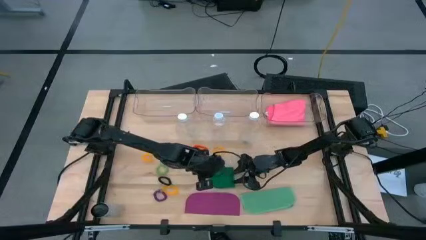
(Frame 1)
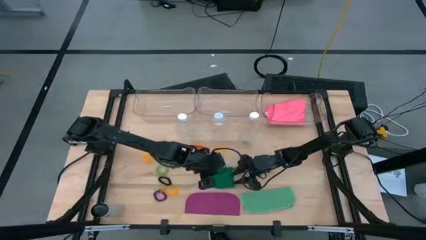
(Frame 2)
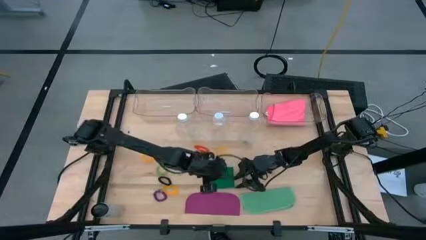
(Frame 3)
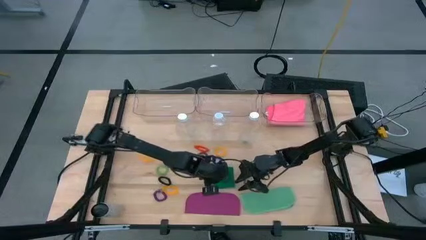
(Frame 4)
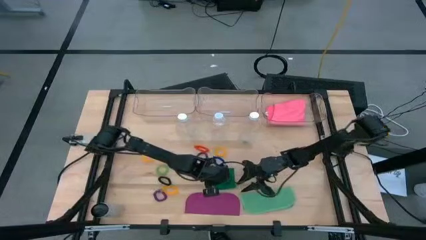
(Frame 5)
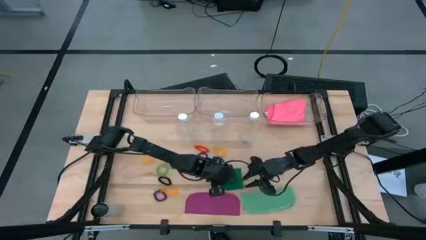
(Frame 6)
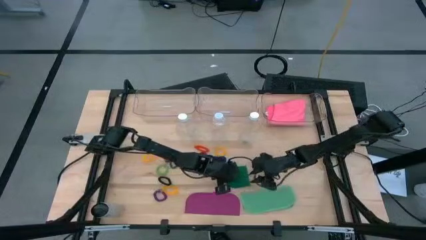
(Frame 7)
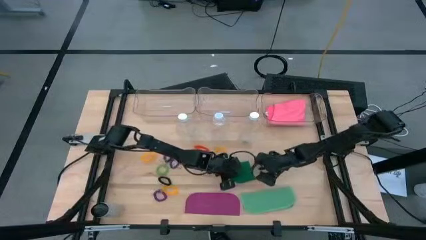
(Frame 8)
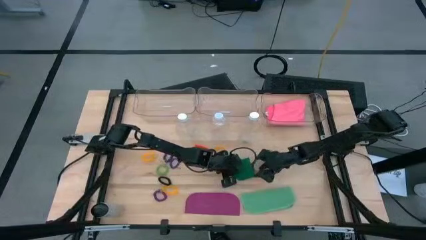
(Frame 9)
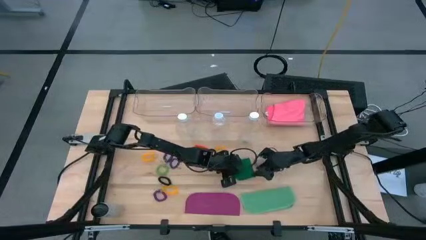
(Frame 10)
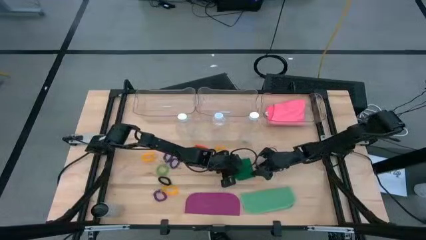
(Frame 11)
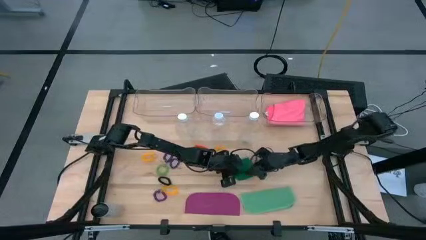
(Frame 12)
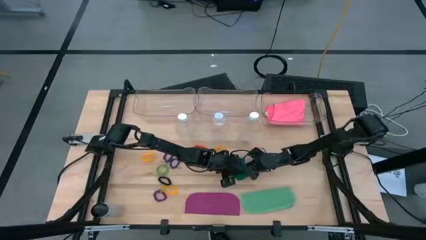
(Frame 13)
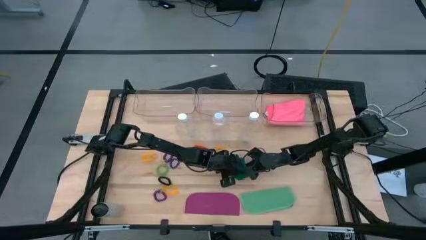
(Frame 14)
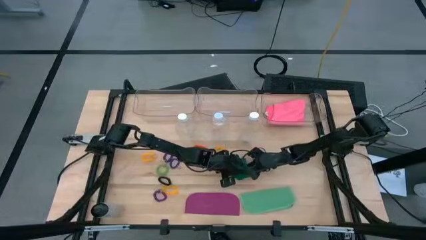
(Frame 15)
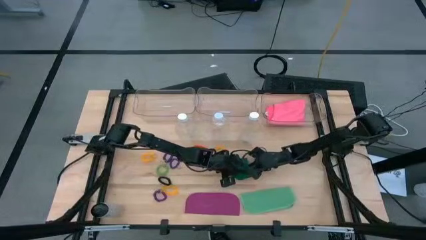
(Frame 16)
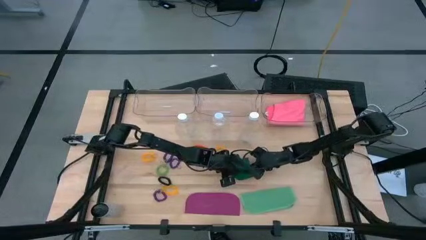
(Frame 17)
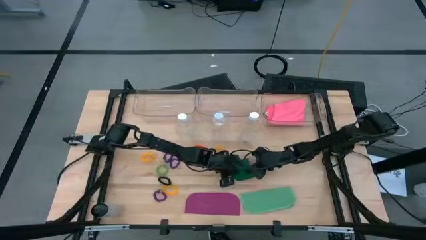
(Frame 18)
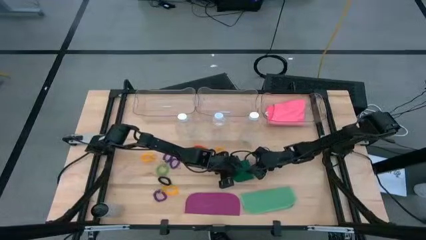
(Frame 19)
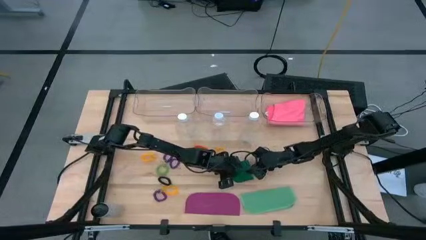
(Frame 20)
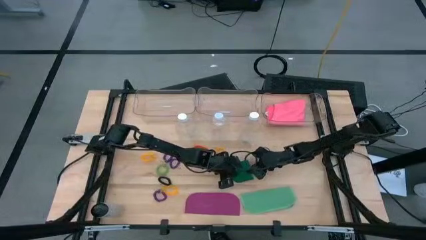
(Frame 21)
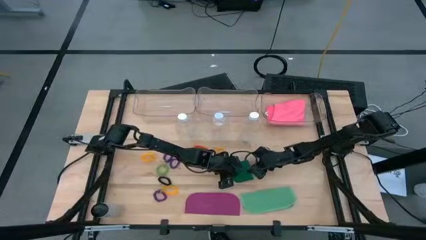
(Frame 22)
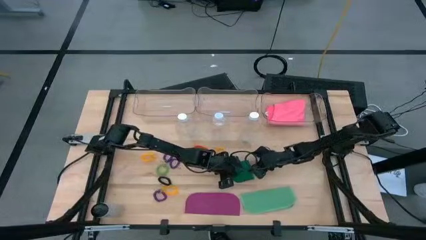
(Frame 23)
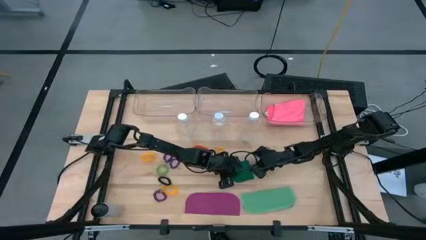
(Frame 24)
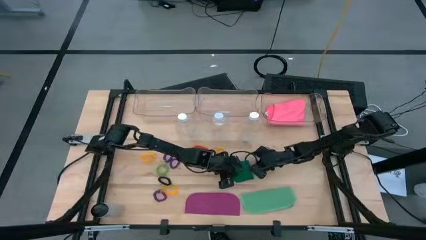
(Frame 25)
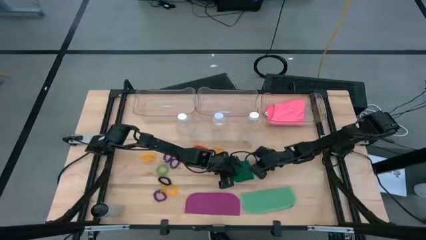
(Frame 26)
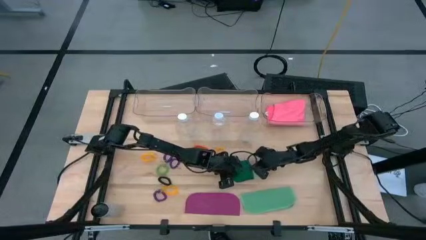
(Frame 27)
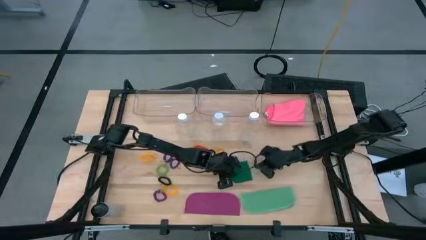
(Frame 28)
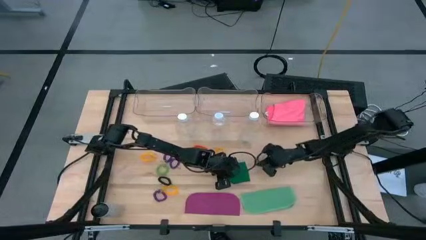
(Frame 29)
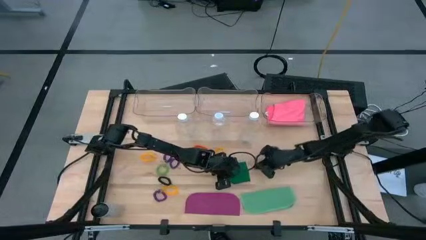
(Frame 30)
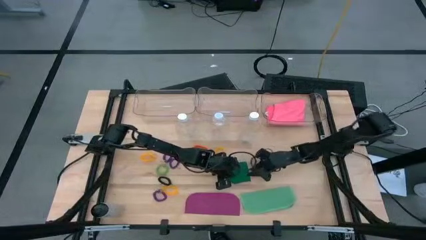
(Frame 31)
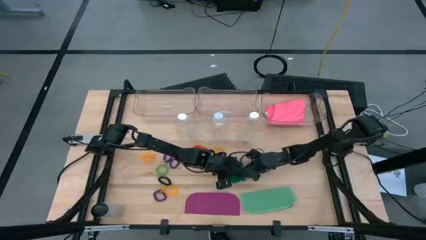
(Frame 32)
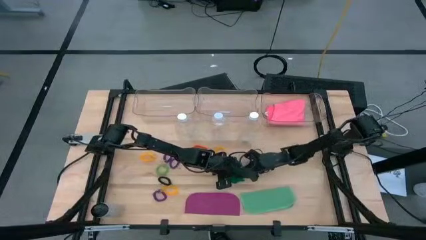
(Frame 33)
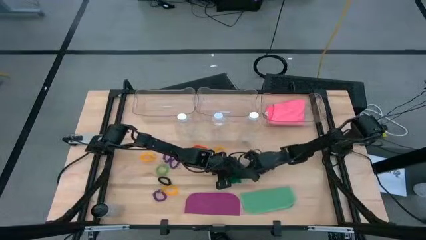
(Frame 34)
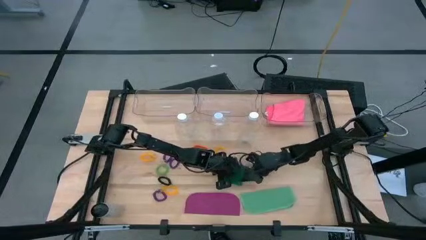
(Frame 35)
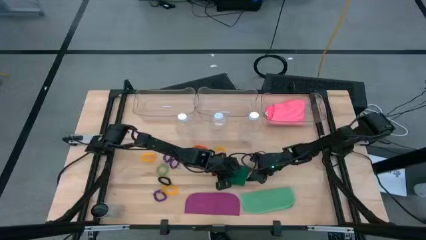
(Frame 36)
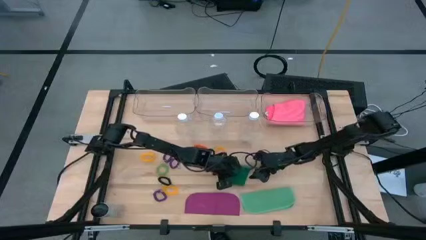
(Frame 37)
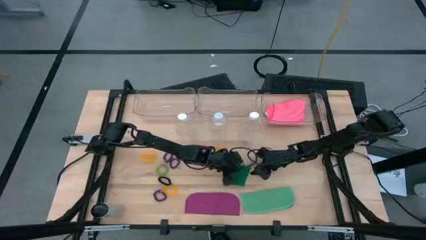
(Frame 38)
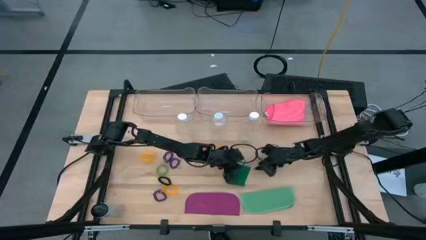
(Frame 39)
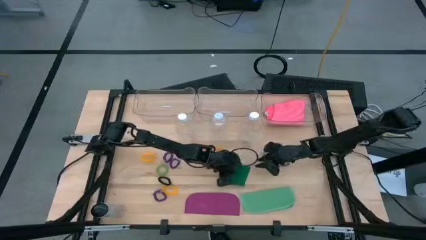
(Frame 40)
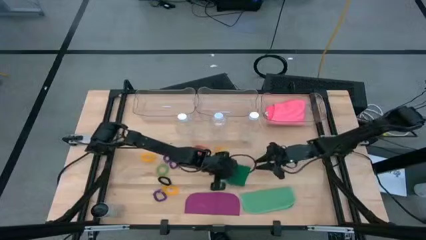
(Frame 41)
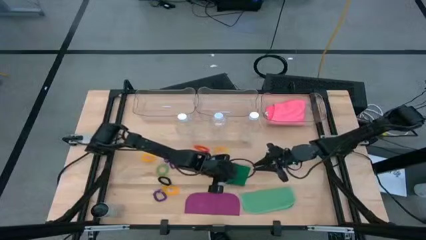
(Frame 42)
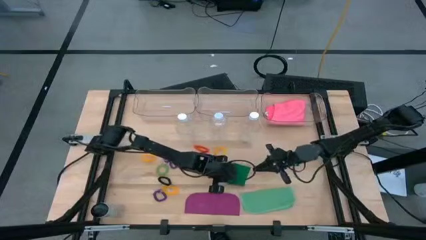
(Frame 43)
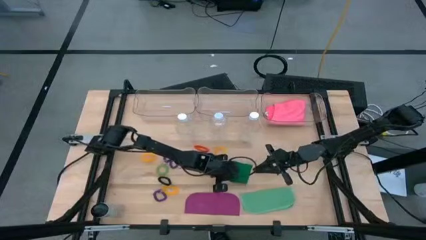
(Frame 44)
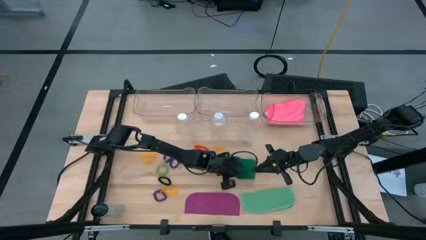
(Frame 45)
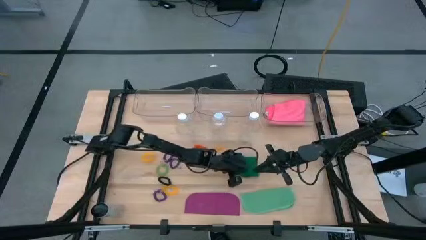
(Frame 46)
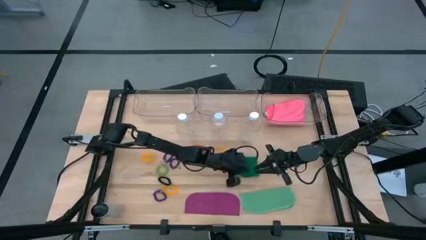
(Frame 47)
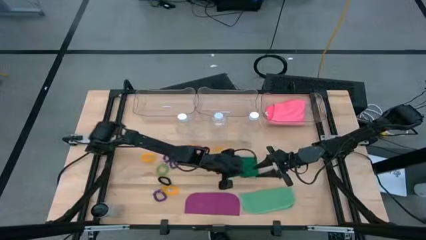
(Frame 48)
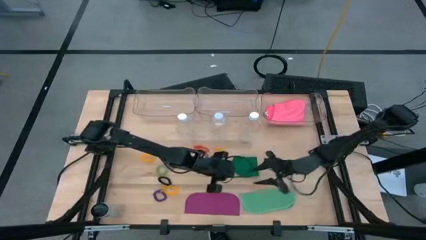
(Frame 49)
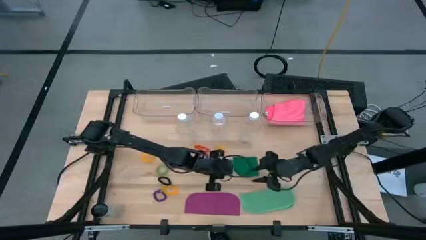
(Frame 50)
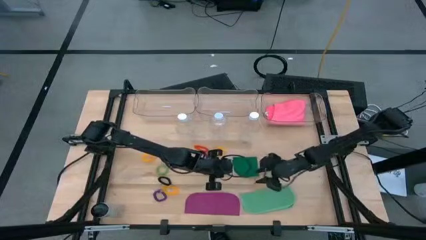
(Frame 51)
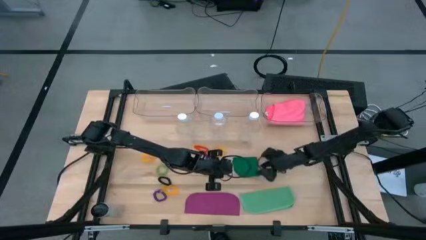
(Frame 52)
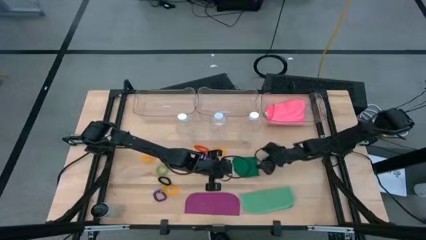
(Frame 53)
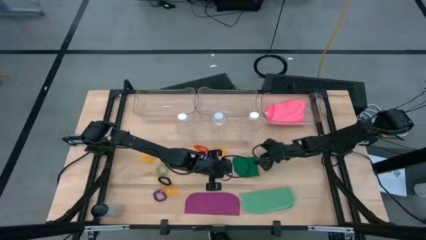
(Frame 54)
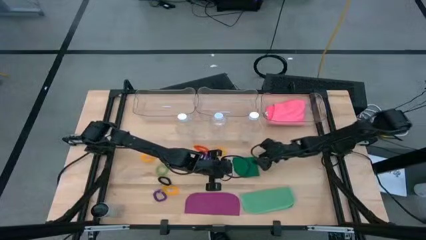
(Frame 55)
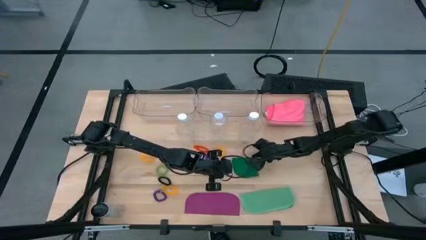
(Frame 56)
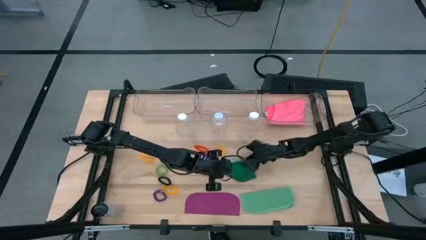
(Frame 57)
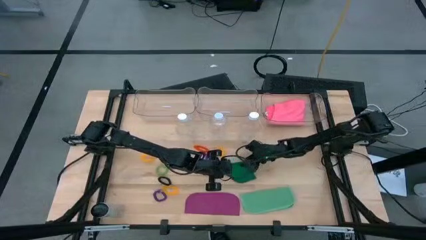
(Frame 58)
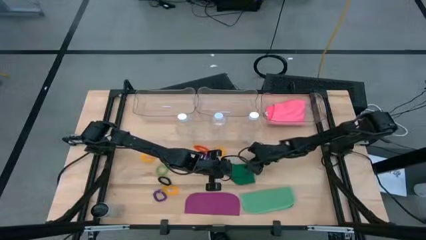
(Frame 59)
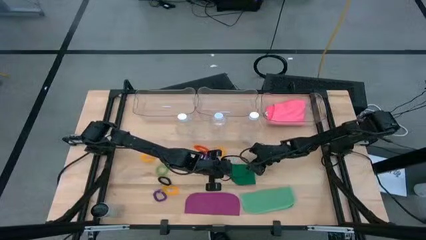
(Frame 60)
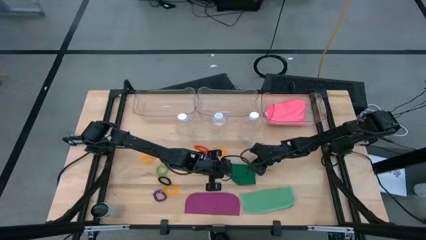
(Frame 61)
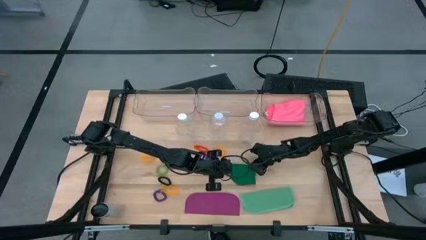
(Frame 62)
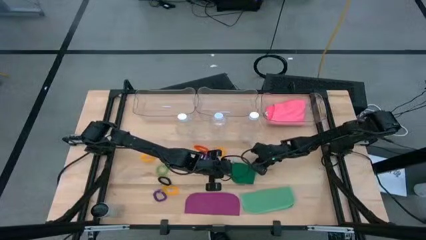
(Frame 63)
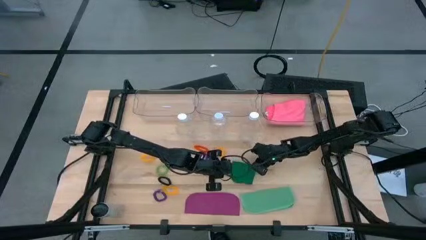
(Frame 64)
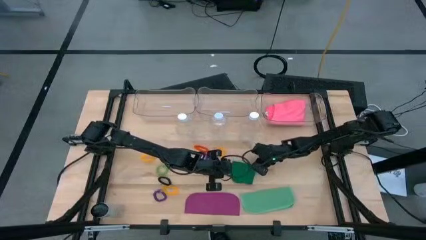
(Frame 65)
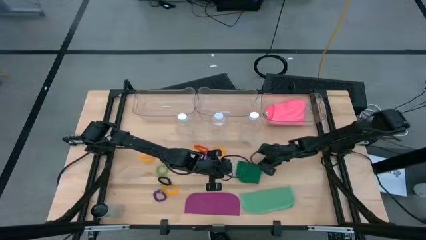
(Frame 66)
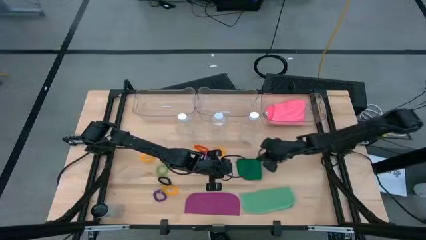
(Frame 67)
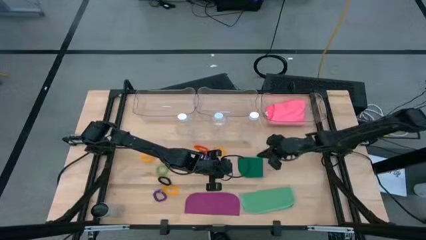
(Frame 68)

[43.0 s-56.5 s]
Task: Pick & Place Sports Items
Put the green microfiber towel into the right transparent bin
